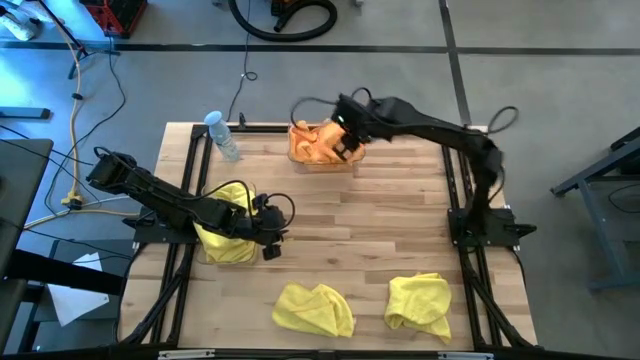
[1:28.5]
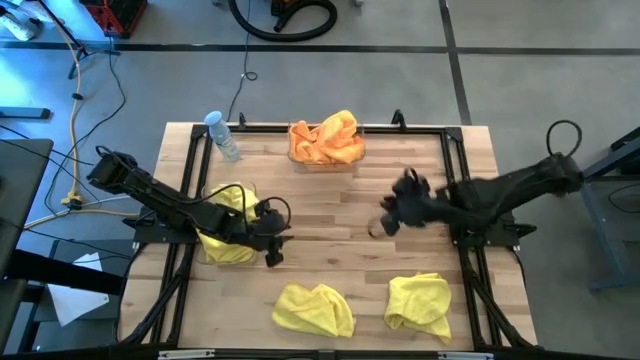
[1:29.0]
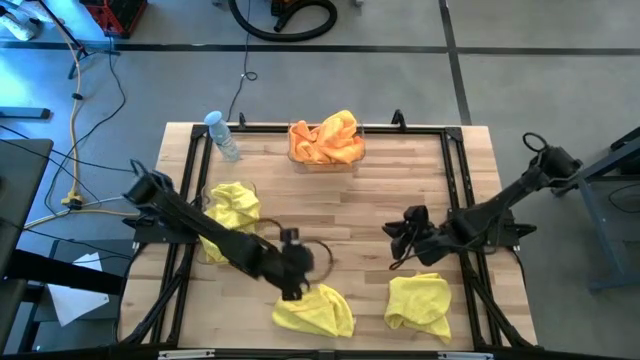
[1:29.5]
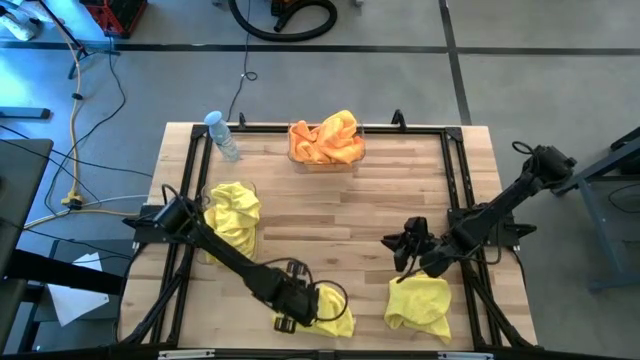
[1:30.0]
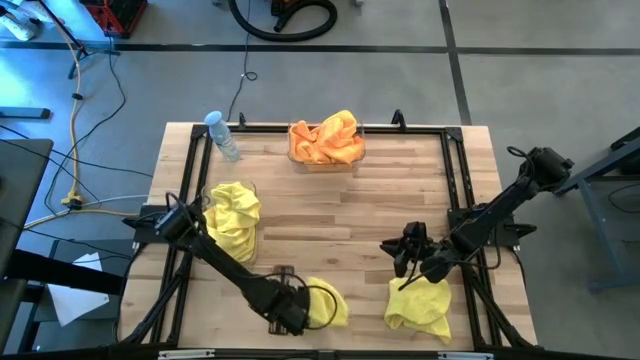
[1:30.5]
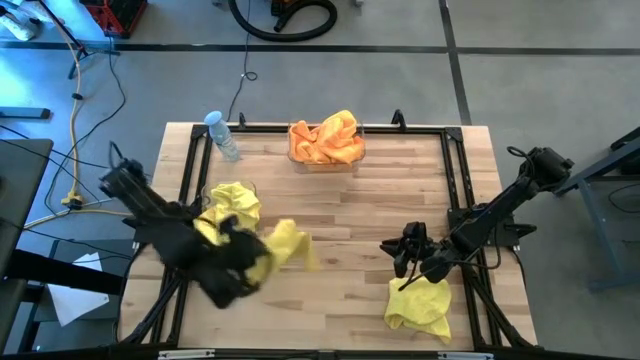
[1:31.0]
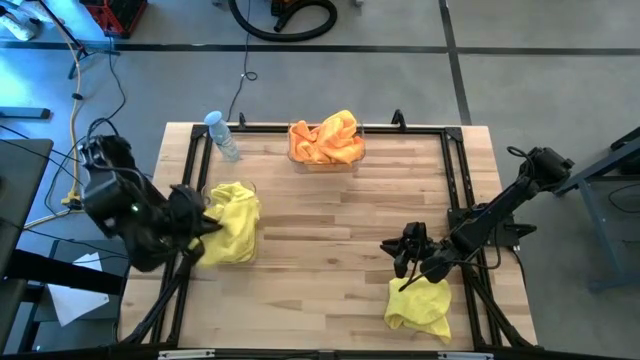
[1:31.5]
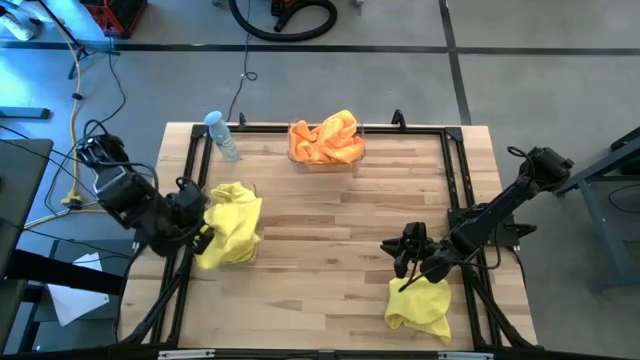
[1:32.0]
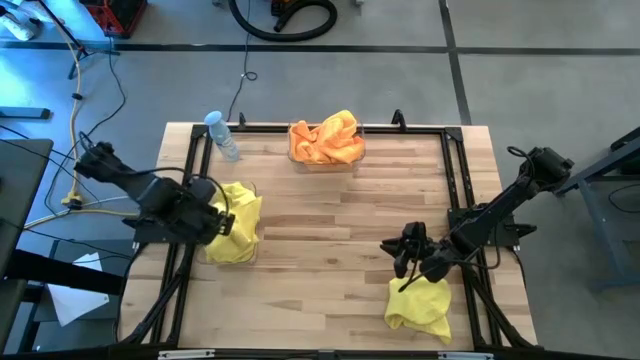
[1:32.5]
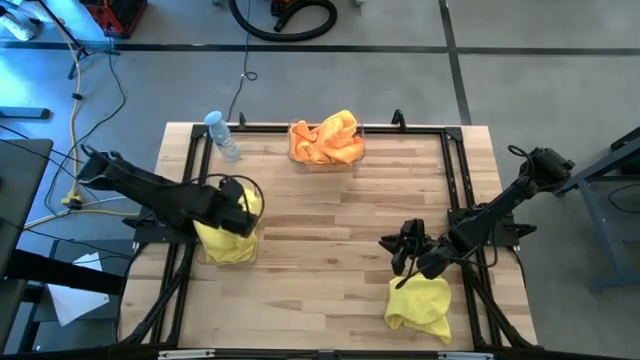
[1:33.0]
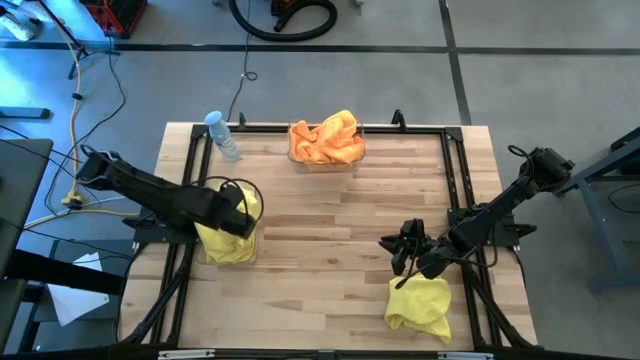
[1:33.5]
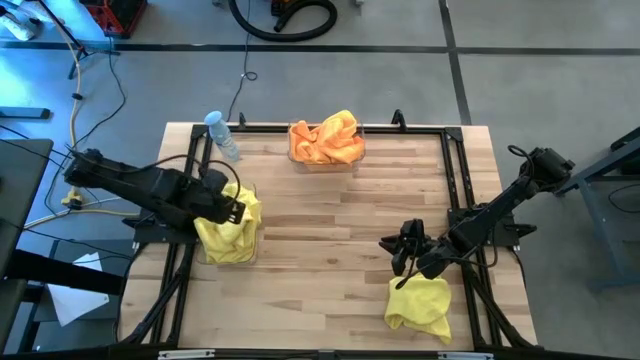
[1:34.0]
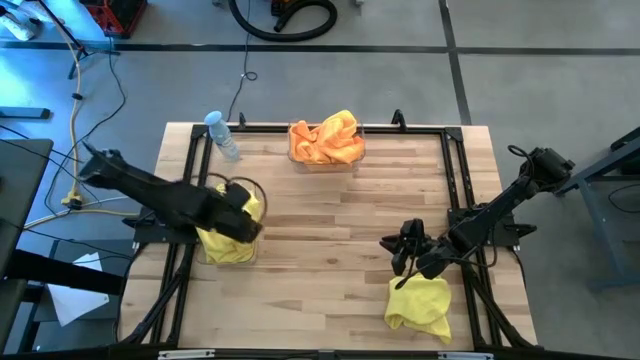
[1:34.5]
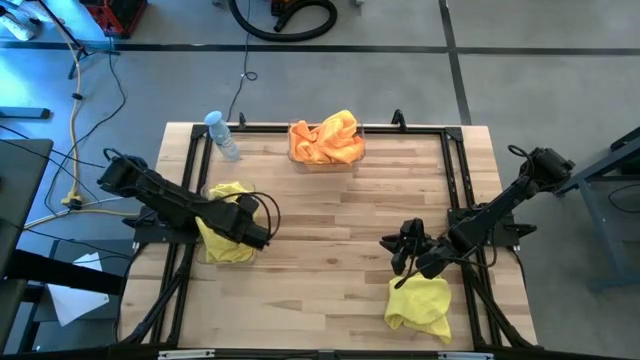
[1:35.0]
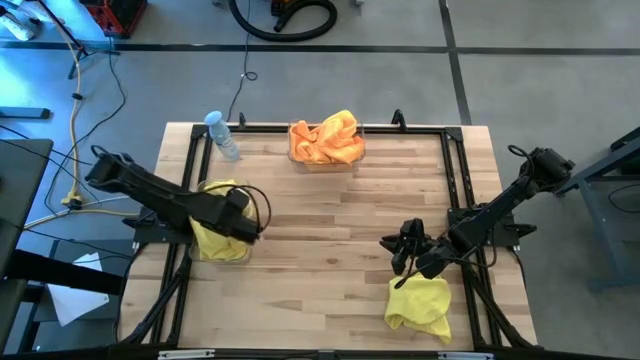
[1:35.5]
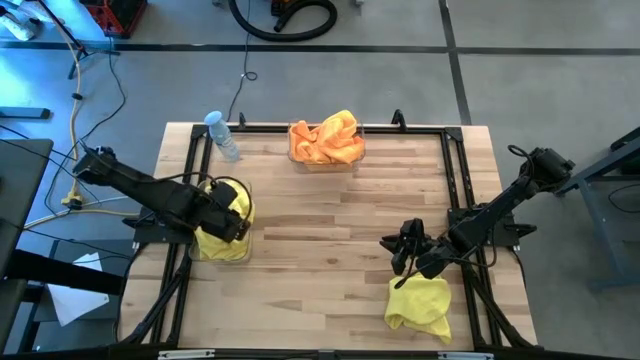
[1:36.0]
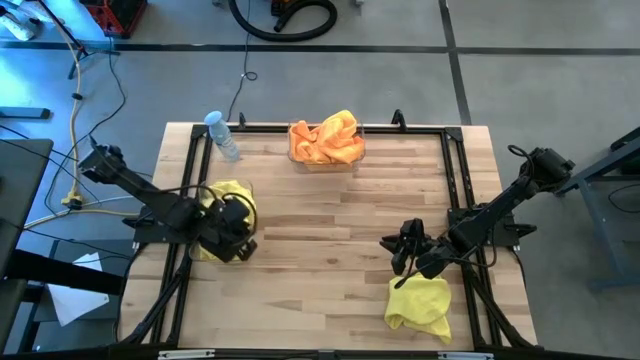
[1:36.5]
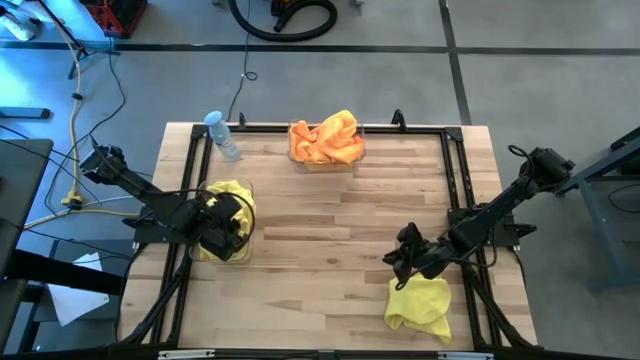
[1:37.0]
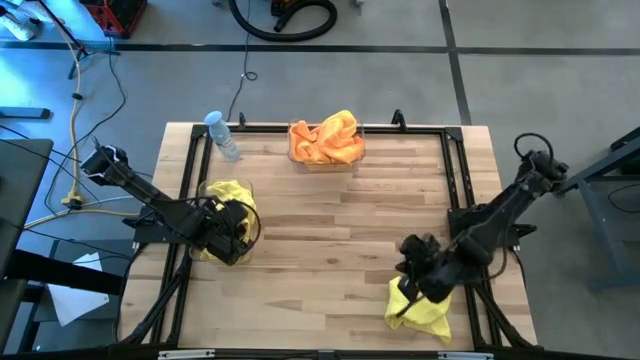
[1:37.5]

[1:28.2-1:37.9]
Task: Sort microfiber towel by color & place in baskets
Put the yellow microfiber towel into the bottom transparent bin

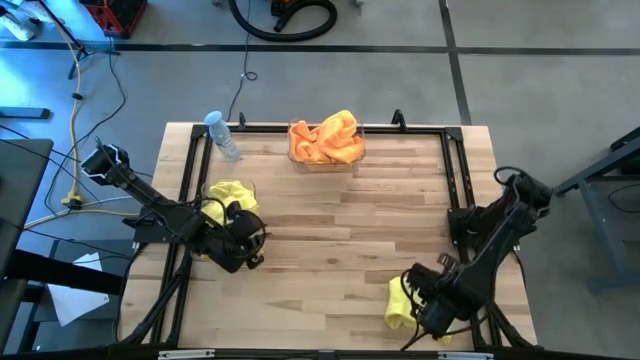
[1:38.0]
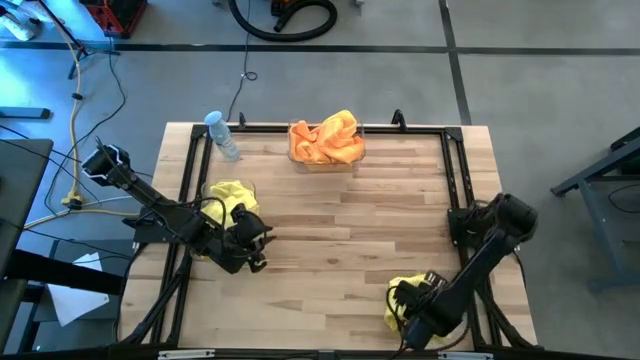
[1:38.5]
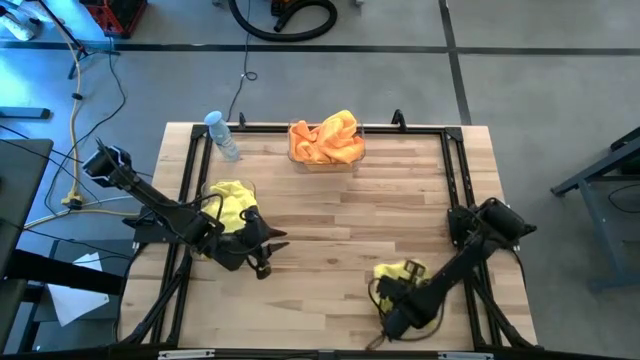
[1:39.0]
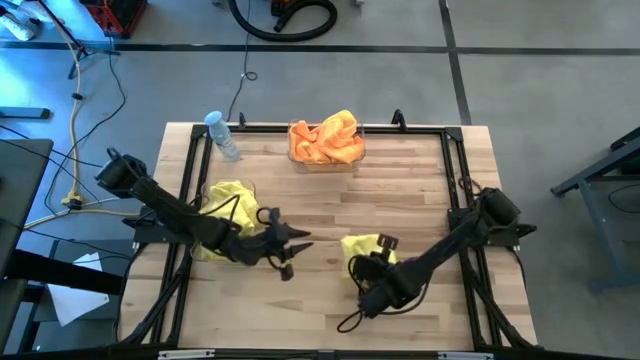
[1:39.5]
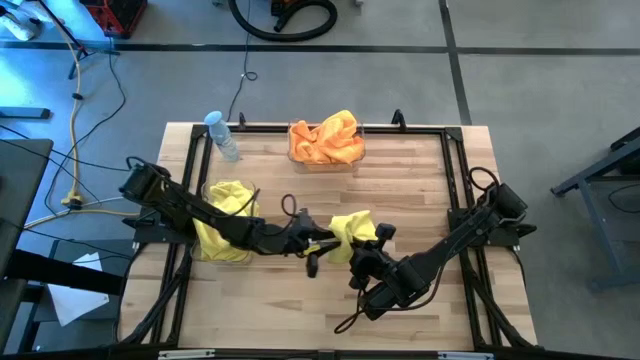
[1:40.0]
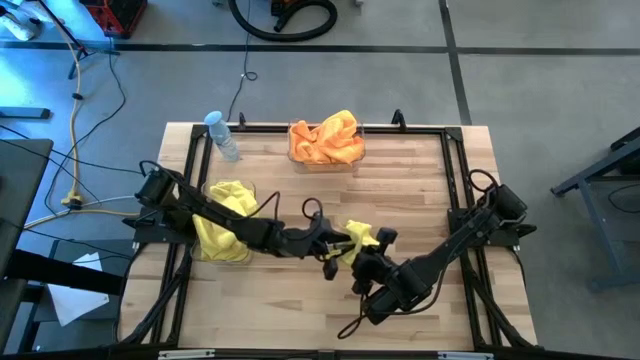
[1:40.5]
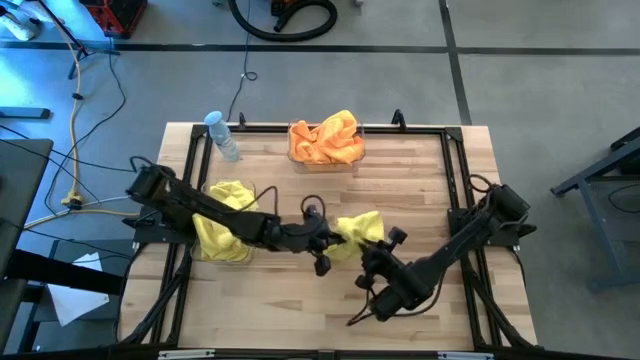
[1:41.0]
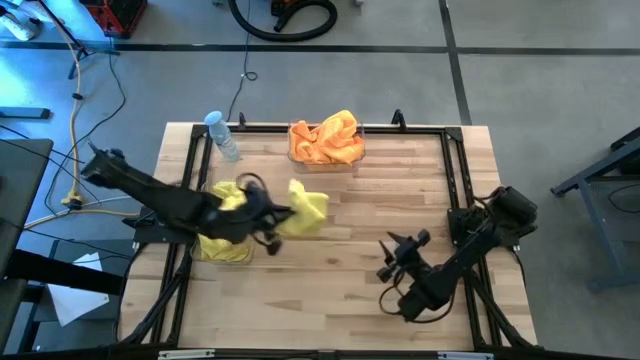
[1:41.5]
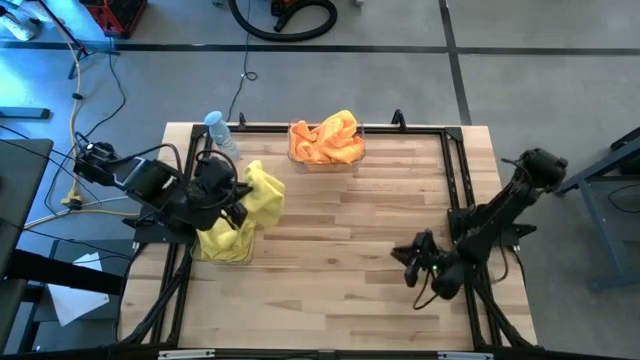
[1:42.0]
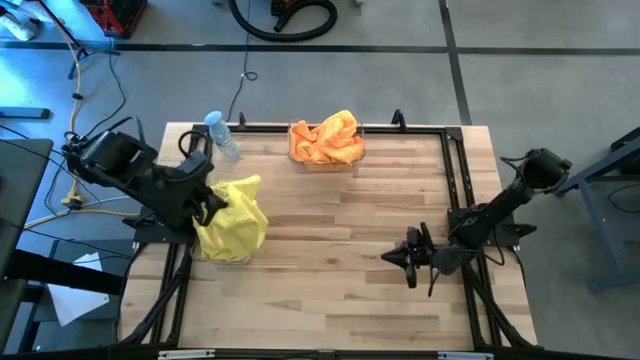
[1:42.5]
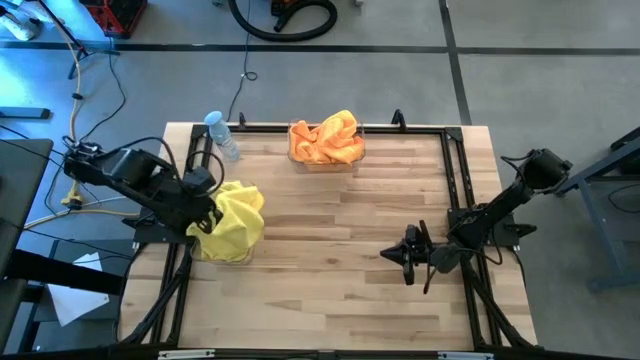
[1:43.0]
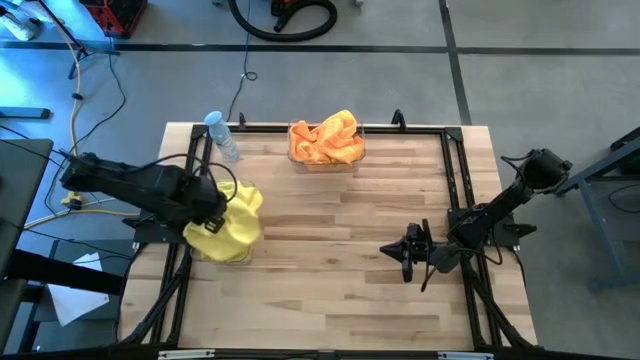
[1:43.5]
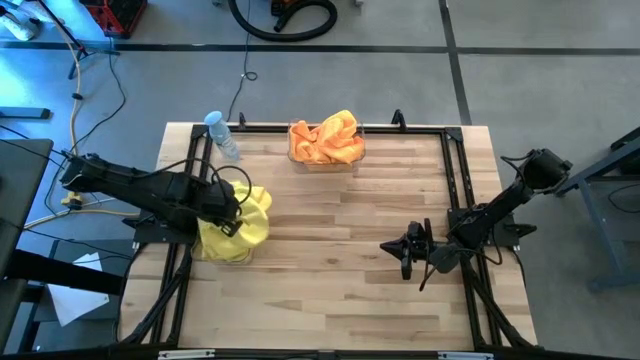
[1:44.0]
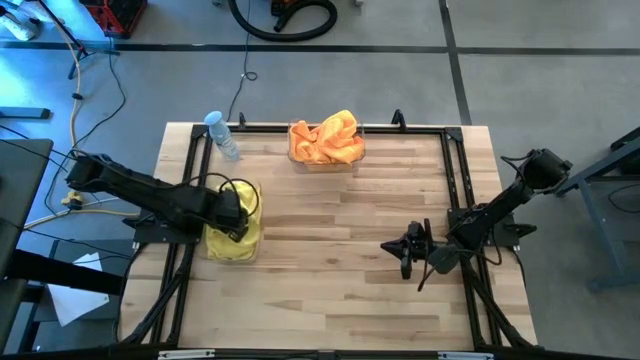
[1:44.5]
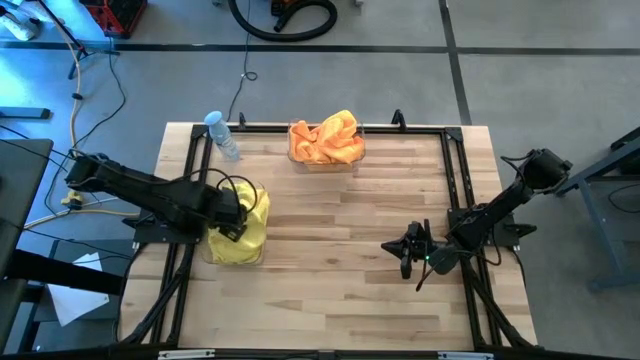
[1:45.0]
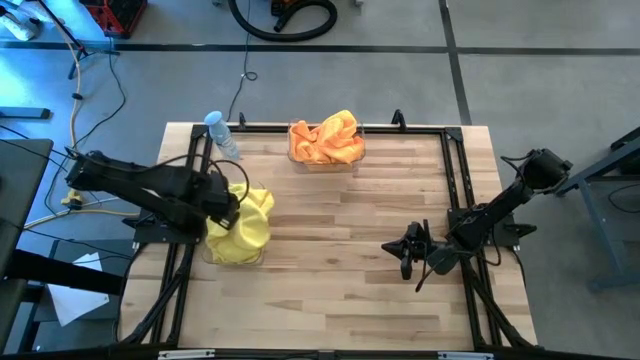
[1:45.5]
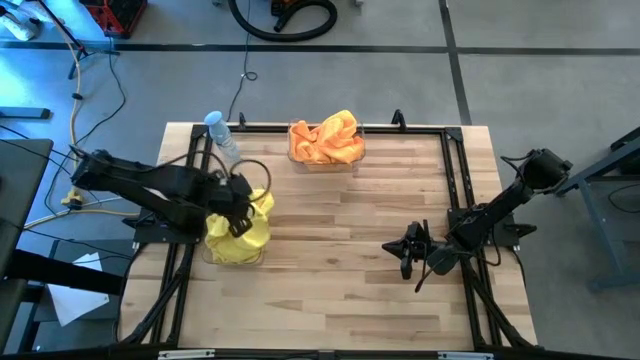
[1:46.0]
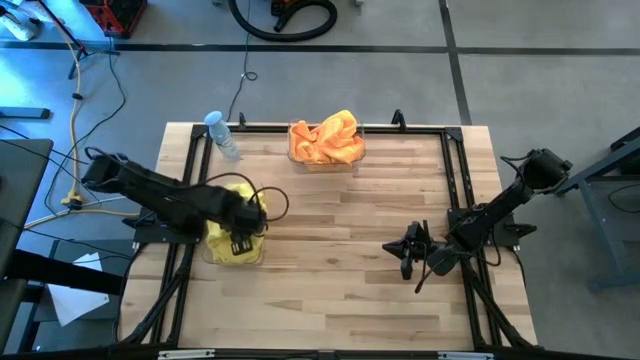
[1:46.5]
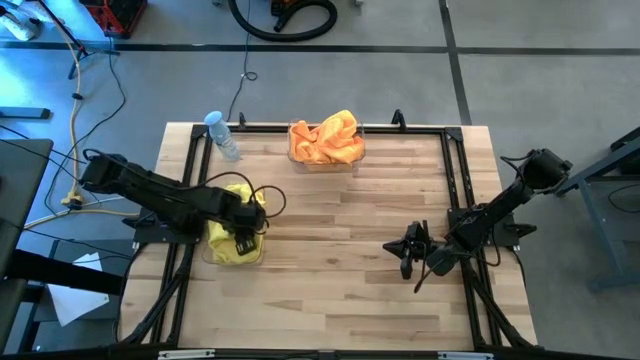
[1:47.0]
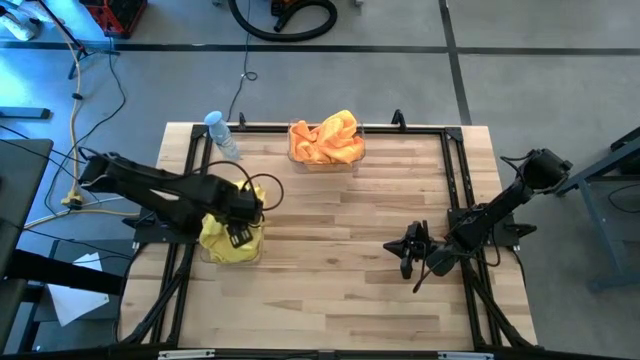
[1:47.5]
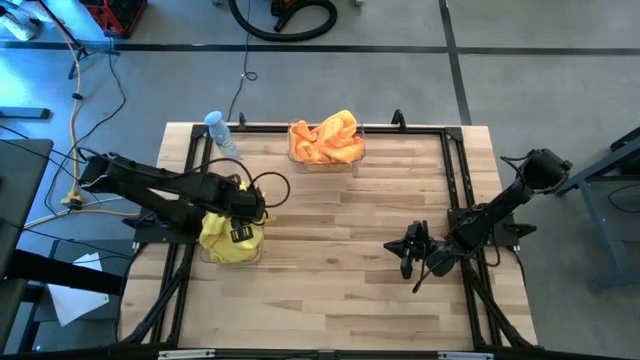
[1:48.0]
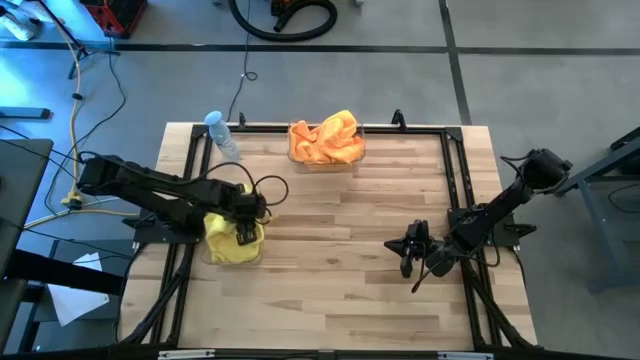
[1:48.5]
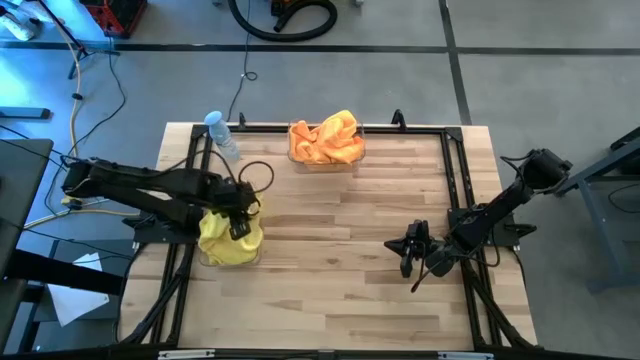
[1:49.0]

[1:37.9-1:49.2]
Put the yellow microfiber towel into the bottom transparent bin

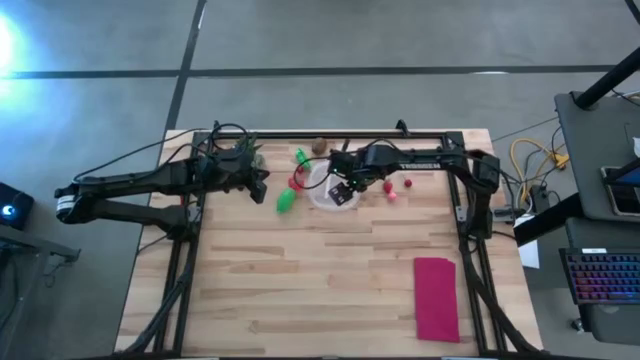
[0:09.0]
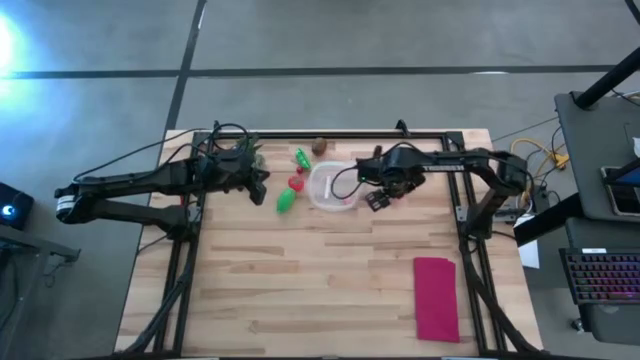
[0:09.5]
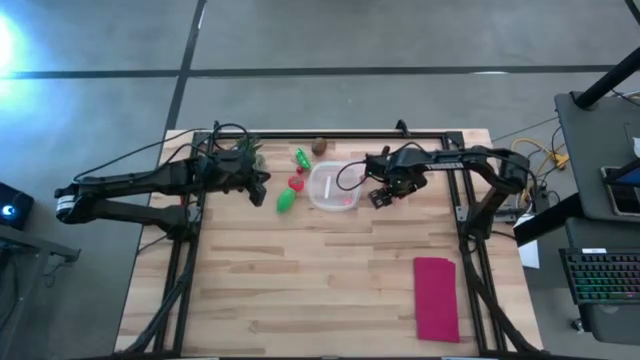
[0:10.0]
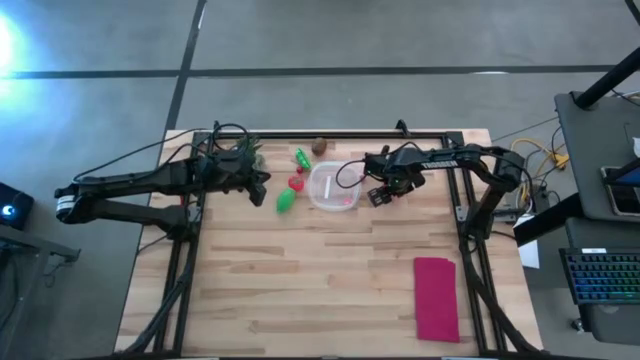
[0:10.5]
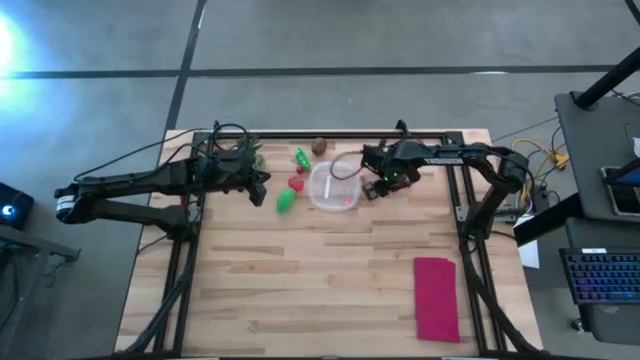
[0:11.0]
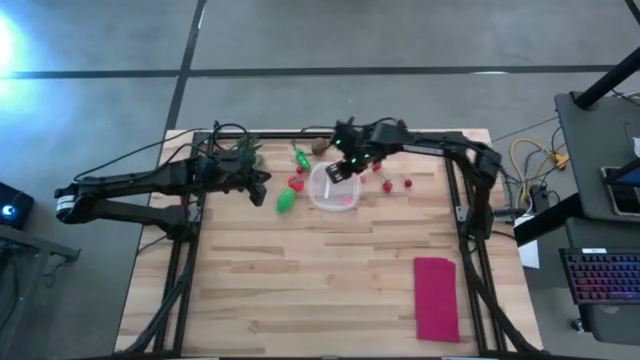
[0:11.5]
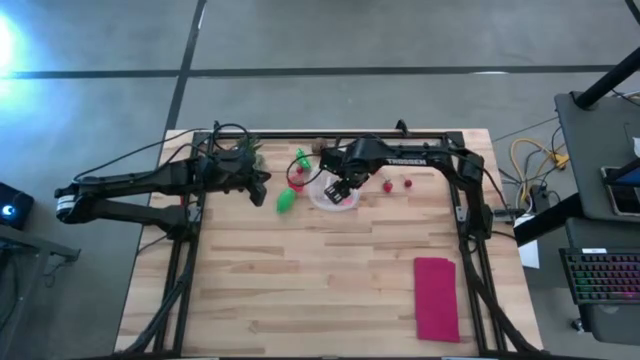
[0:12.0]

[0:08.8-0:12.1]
Task: Pick and placing Produce into tupperware
Put the bottom peach into the transparent bin
